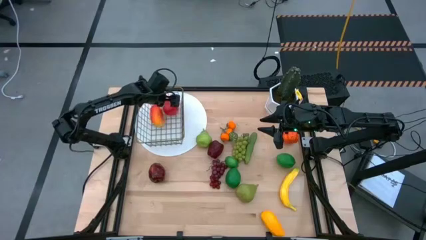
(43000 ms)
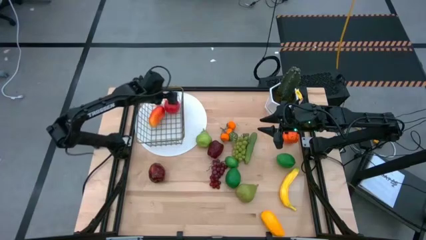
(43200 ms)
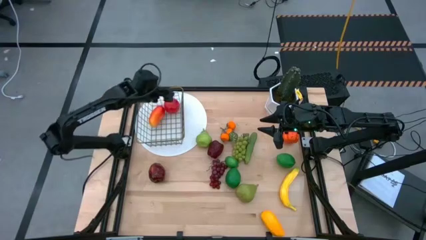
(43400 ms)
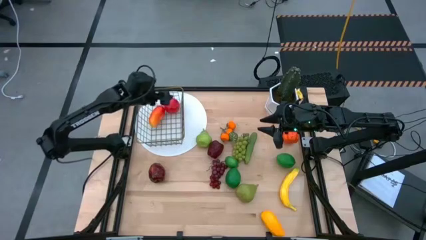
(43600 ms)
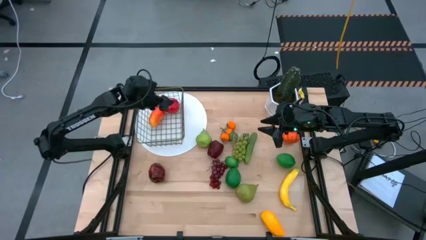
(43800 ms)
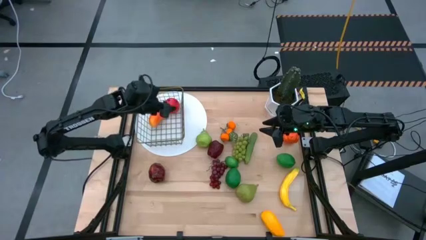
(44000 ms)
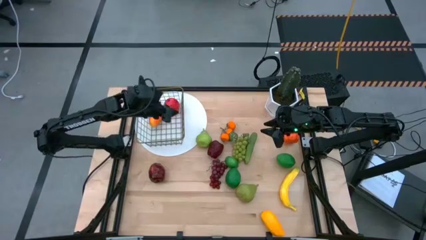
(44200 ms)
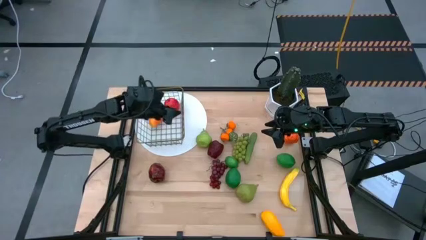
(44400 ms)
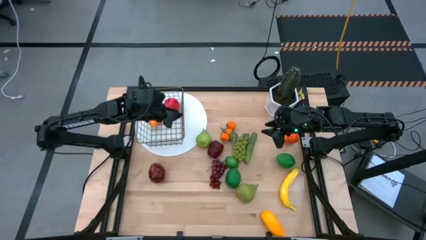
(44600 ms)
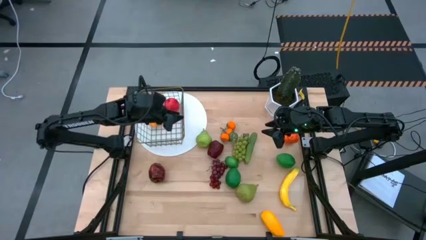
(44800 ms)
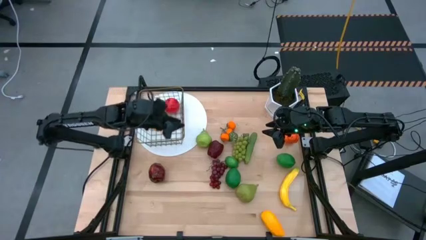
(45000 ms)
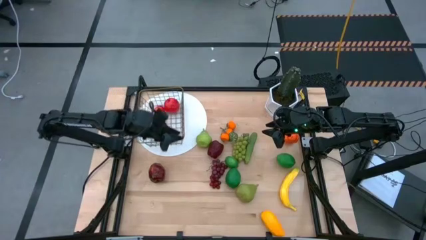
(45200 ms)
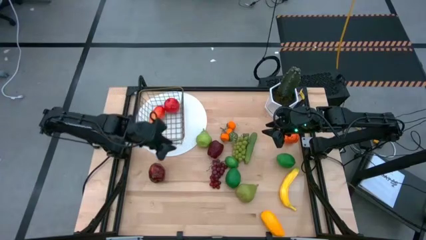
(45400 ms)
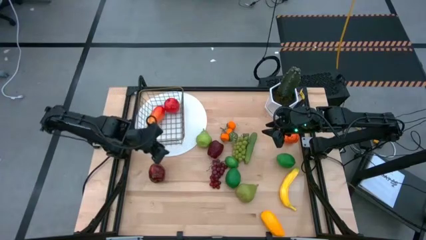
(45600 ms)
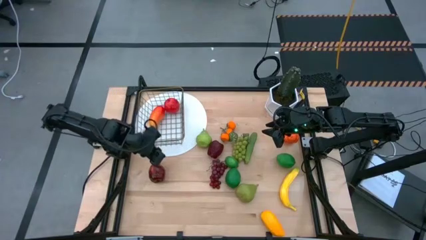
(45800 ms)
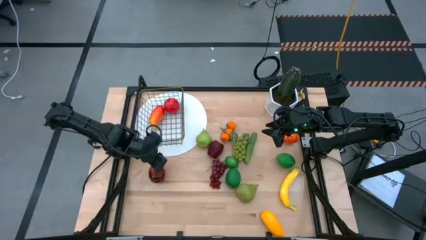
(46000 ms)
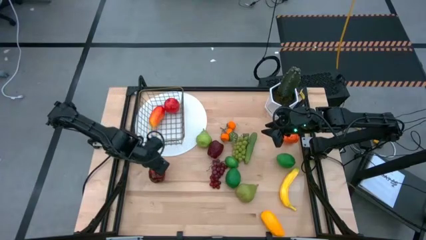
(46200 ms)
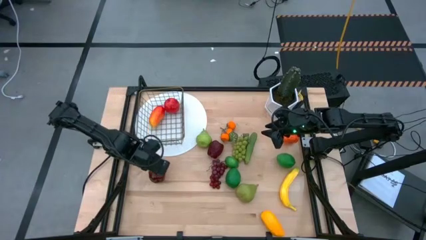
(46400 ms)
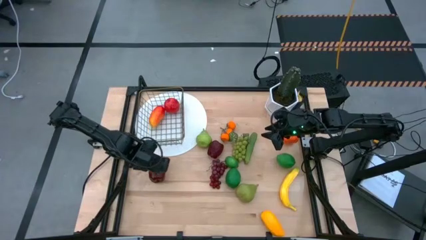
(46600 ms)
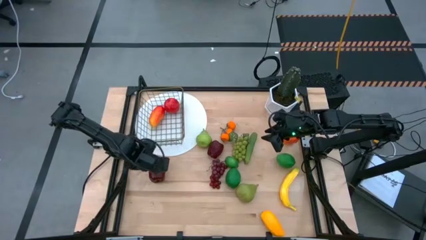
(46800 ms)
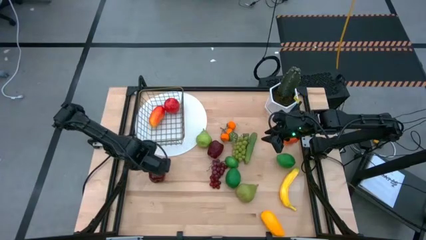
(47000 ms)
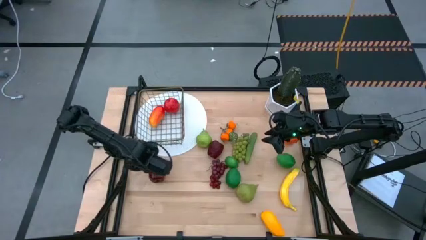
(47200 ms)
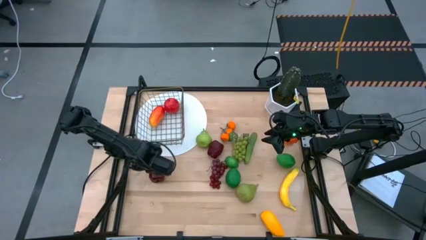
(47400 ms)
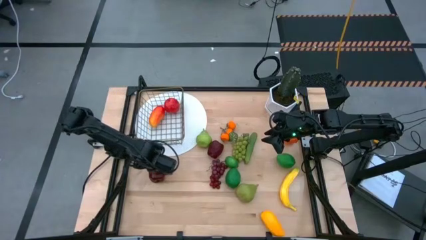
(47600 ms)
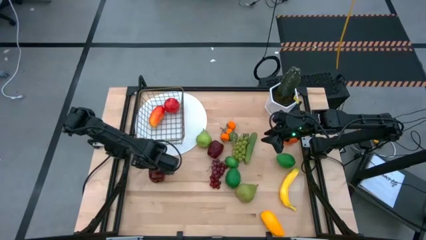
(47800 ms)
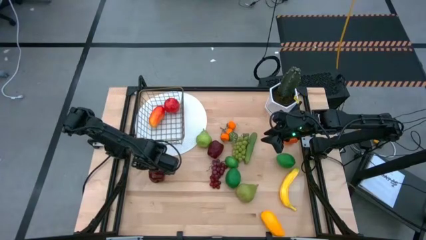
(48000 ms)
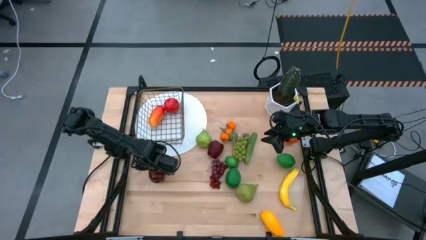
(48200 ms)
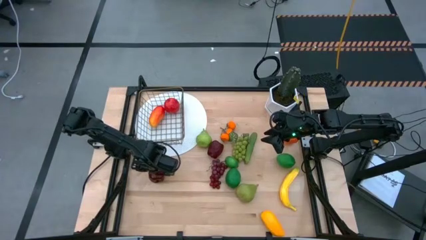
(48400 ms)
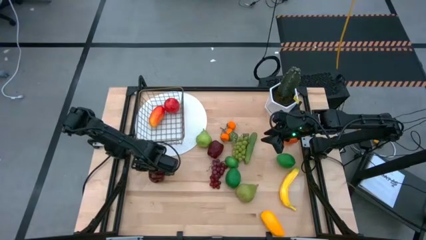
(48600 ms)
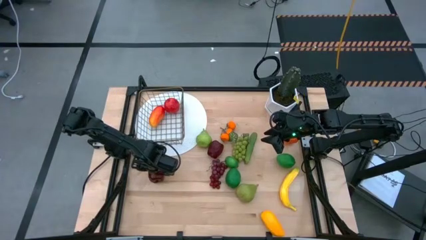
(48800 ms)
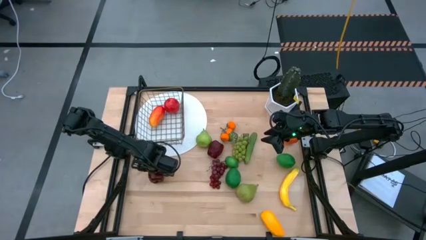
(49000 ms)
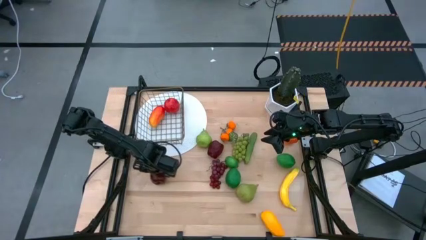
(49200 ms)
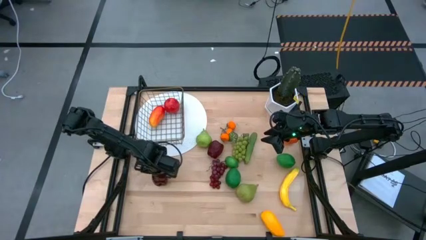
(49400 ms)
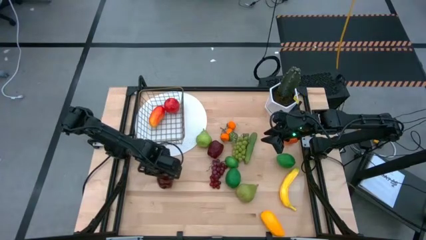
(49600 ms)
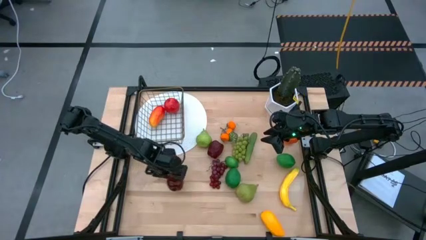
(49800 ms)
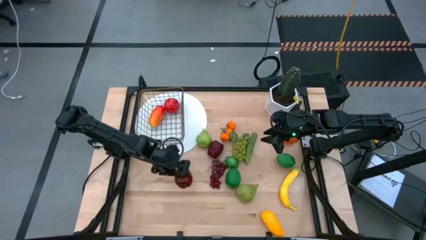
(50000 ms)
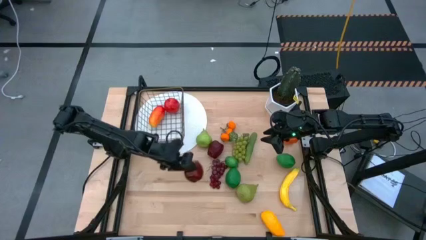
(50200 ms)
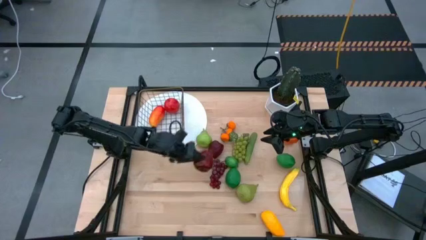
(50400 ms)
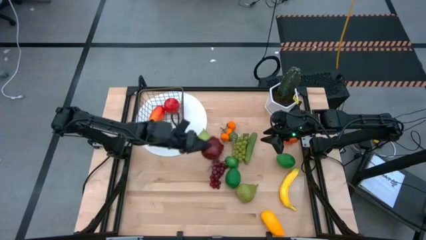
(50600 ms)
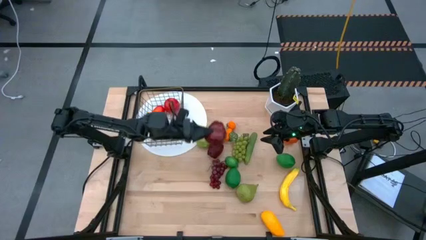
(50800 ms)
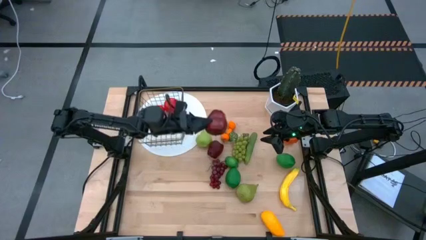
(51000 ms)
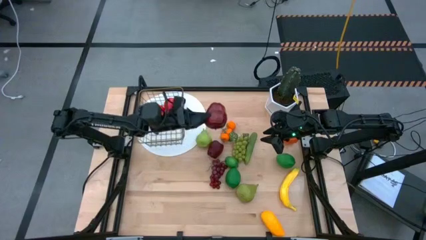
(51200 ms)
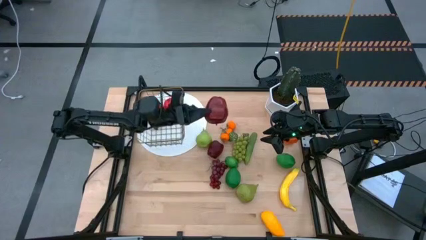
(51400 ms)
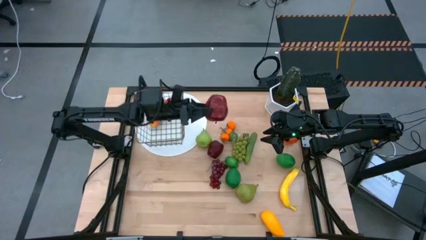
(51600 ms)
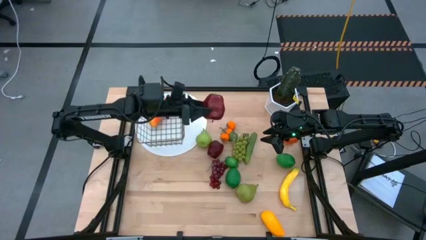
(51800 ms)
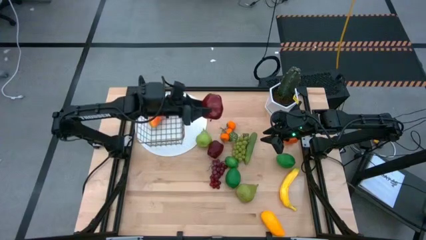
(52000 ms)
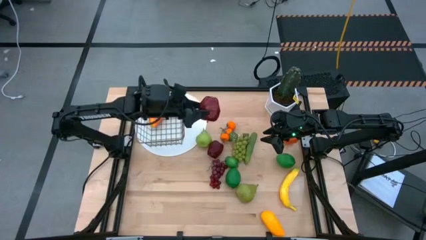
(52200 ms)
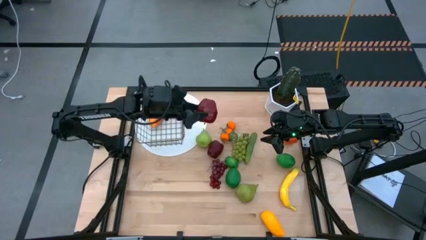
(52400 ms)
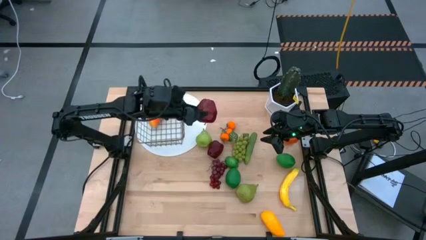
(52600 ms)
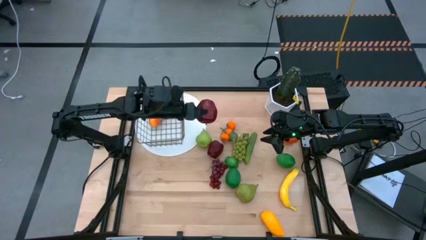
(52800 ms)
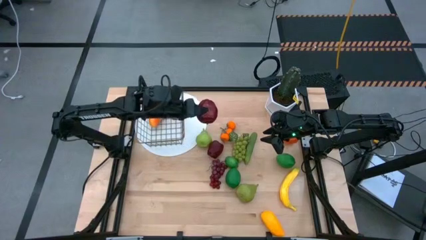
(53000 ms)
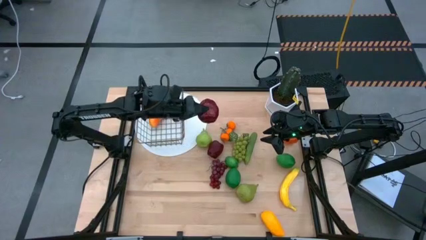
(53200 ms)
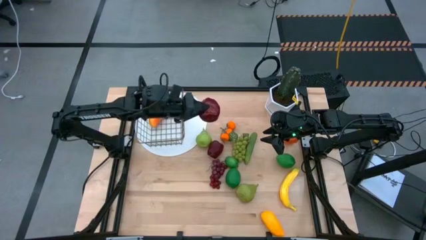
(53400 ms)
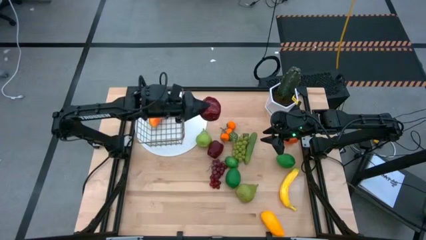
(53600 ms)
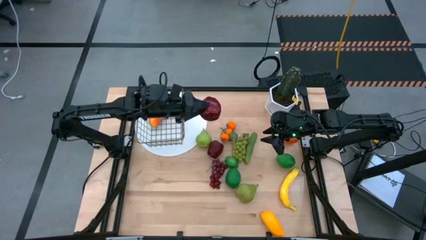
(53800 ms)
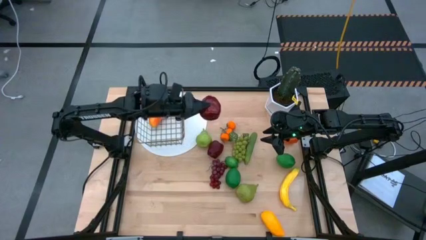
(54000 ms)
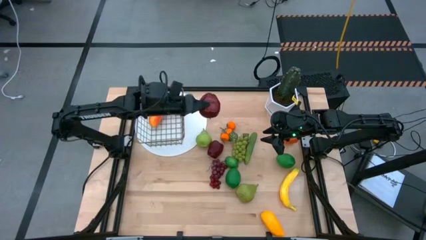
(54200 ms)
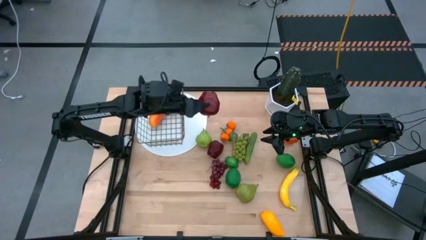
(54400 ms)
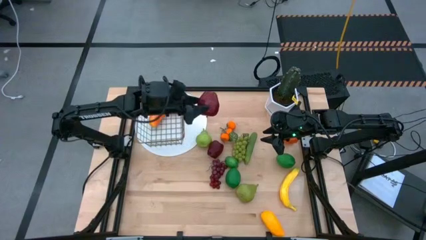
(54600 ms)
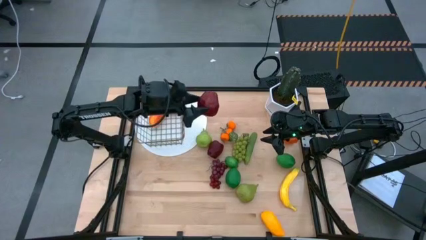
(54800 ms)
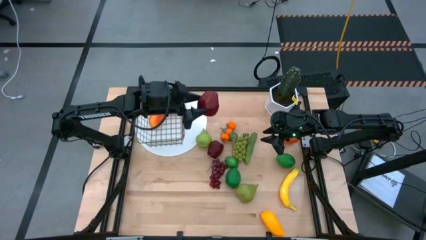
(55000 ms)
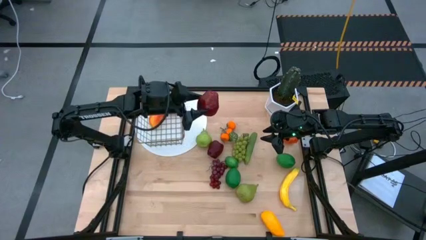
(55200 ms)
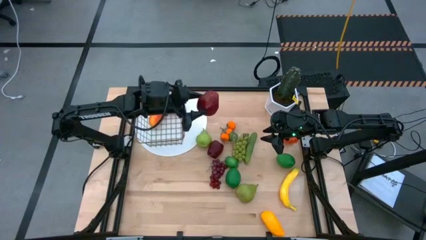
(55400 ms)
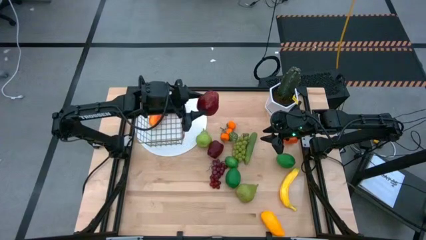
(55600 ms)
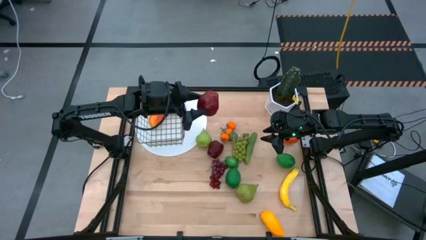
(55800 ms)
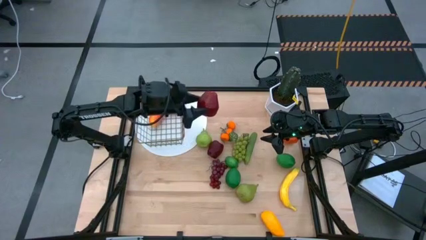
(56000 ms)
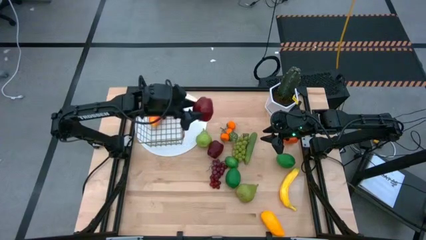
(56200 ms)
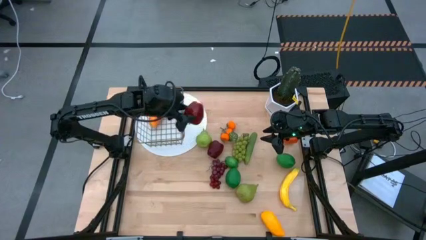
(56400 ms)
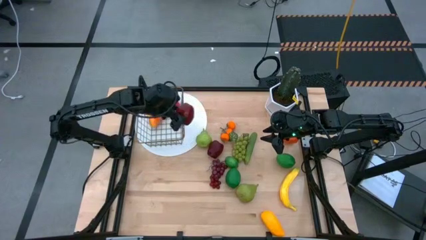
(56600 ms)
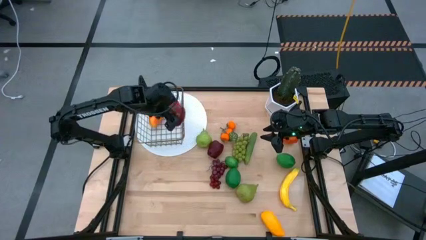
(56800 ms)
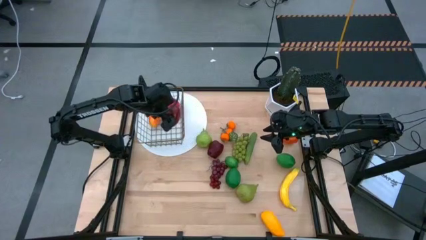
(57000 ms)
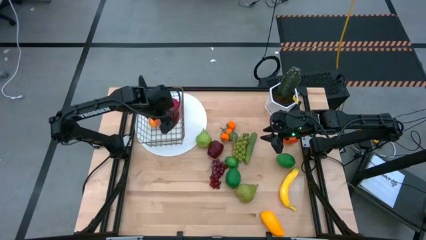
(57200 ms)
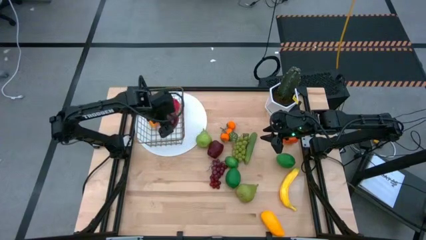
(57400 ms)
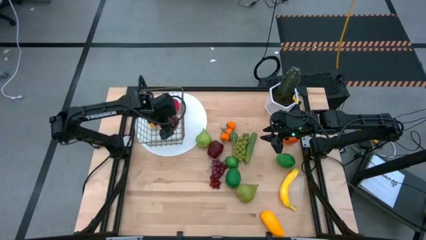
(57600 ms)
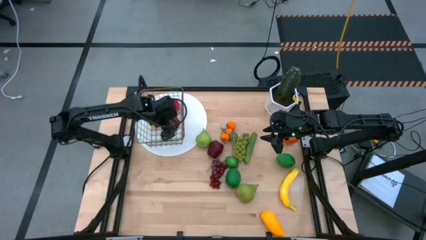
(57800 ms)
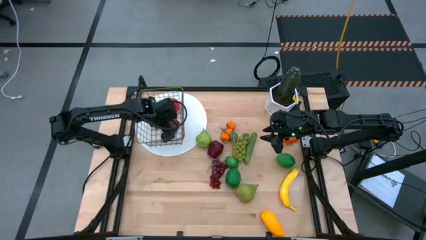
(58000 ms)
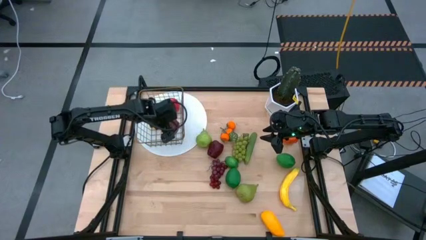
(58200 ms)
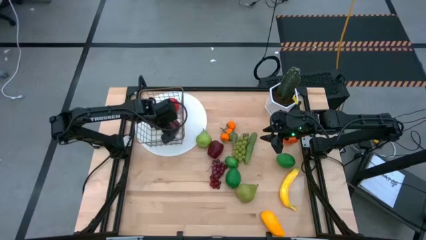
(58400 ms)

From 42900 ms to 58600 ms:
Task: Build produce basket
Put the left dark red apple into the wire basket
